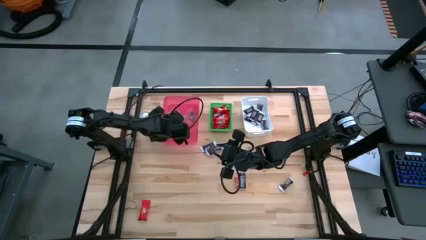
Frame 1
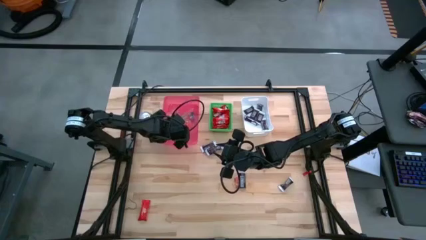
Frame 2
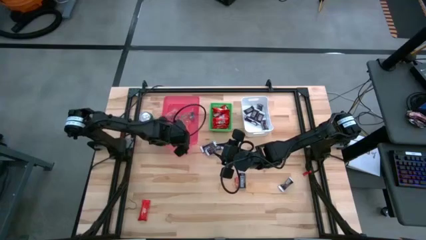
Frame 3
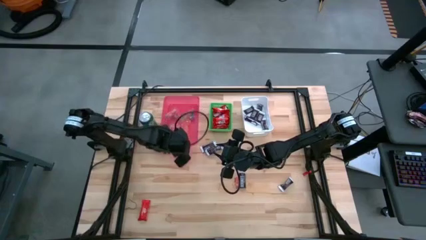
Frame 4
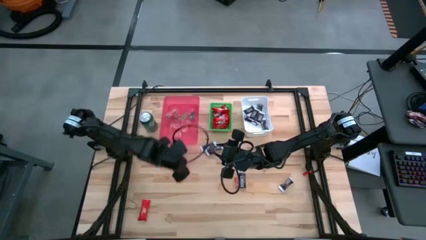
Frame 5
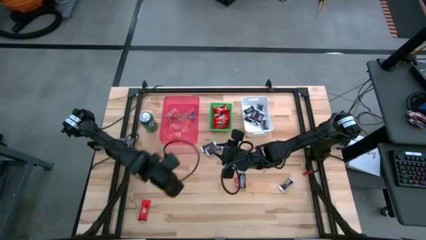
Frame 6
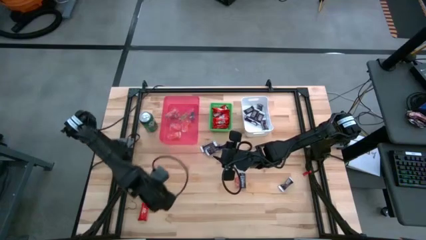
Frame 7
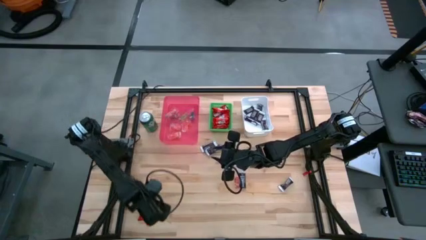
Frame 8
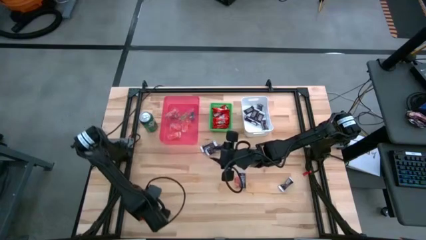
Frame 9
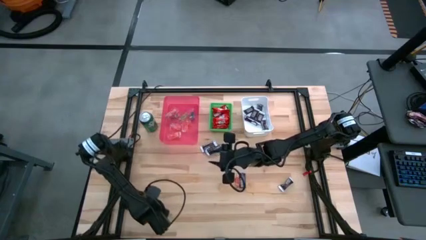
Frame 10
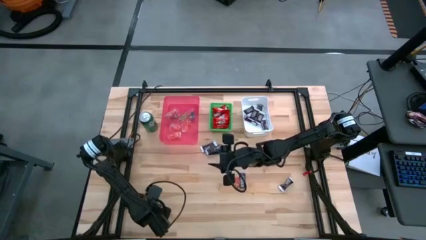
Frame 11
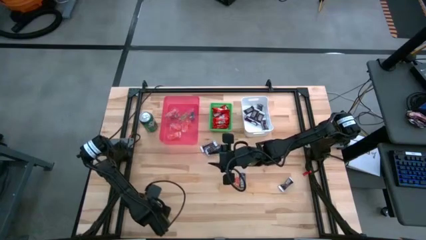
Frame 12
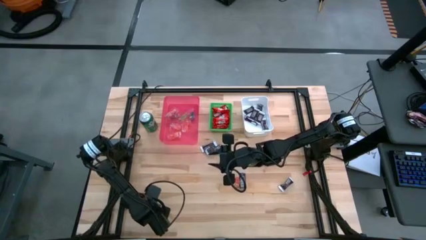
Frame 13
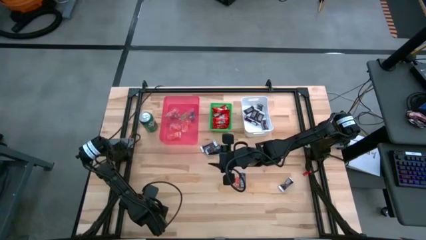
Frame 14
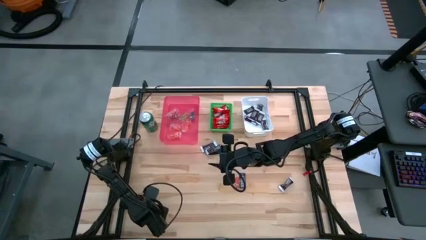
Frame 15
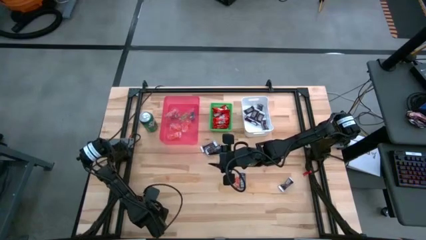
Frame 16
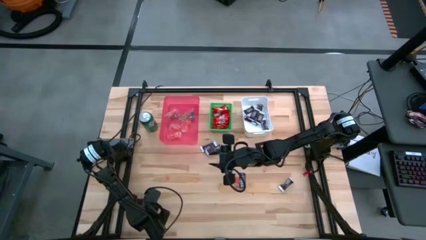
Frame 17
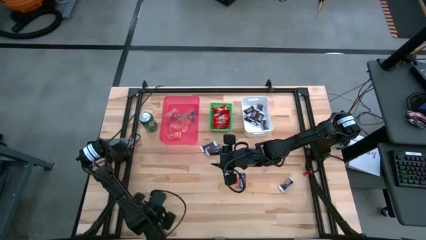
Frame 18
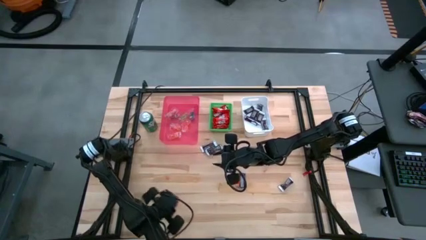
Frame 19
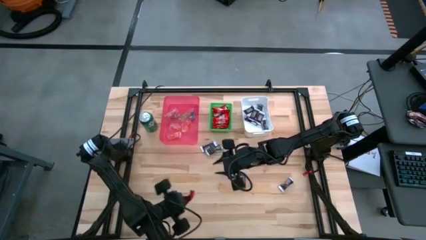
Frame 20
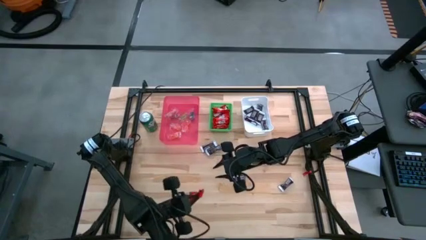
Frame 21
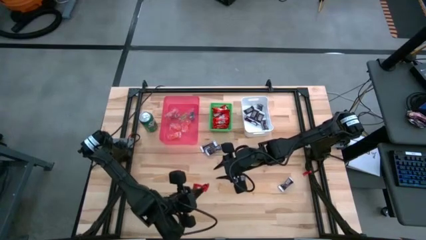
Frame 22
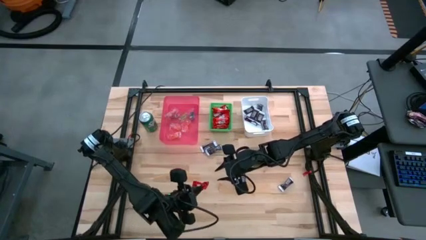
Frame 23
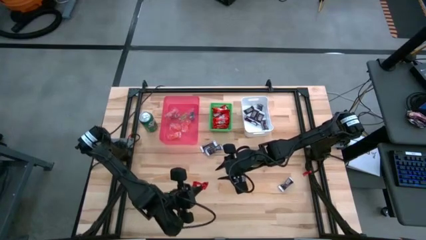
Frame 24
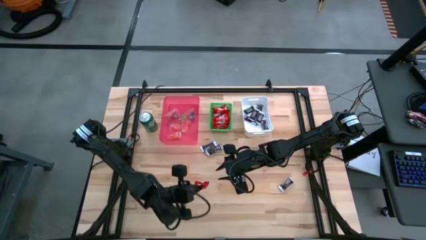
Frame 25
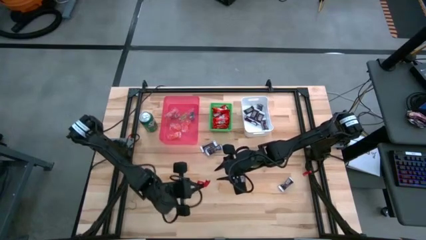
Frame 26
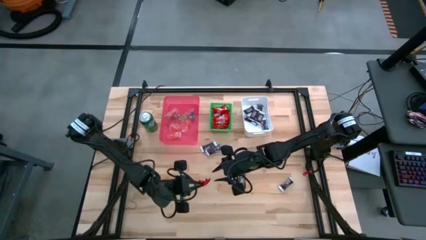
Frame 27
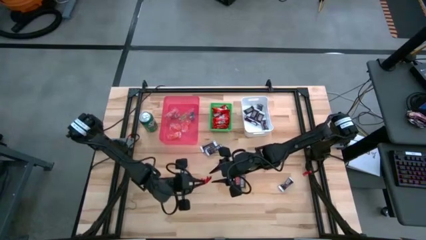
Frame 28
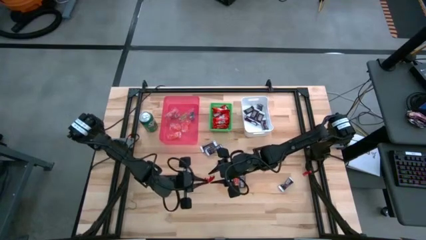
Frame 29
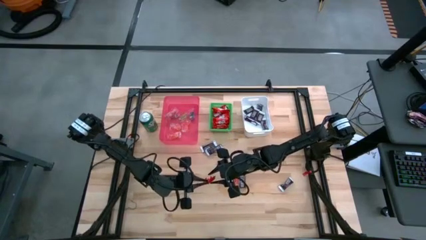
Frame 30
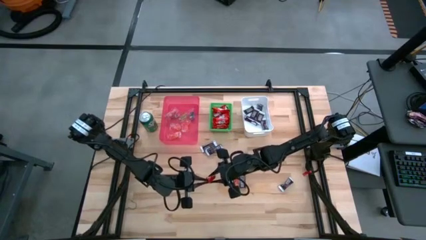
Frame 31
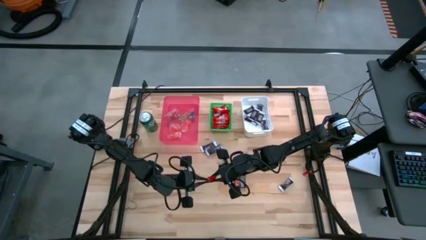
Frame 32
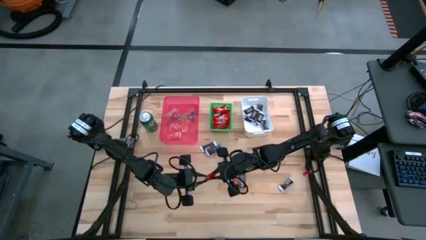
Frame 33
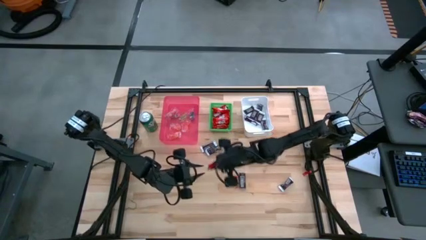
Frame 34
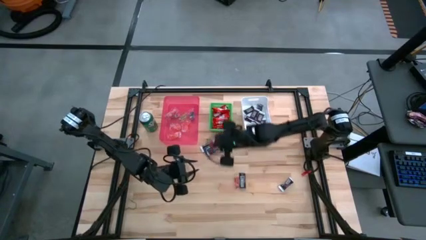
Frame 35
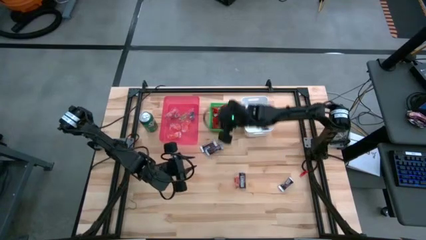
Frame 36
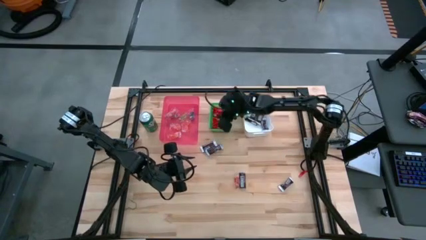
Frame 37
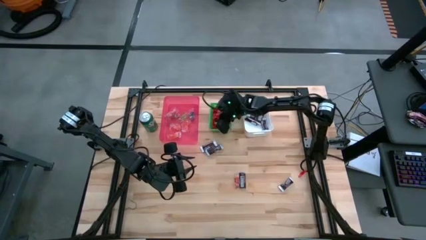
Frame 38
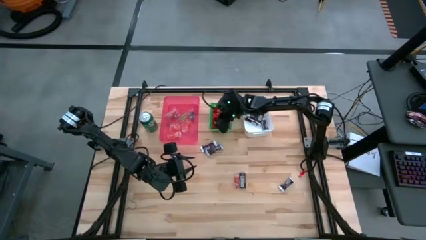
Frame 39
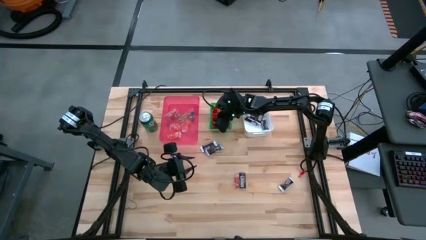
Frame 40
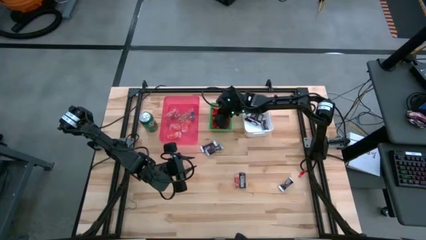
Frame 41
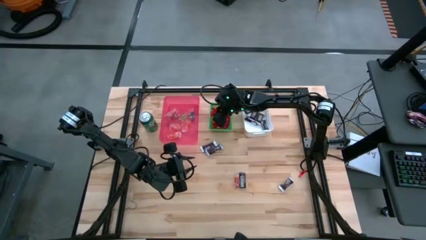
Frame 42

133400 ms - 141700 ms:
Task: Sort candy
Put the red chocolate into the green bin

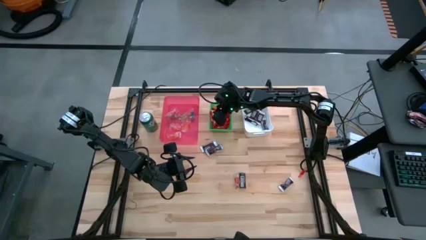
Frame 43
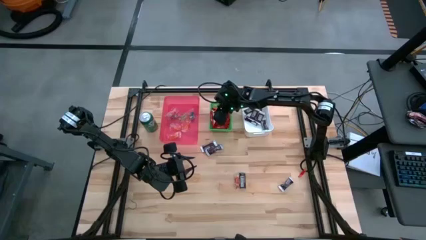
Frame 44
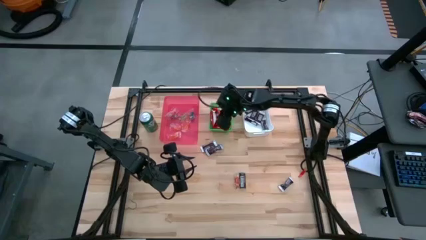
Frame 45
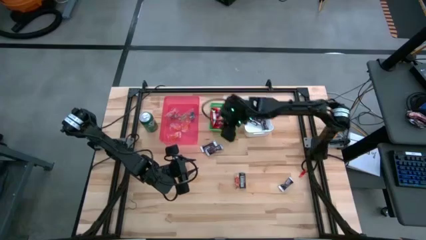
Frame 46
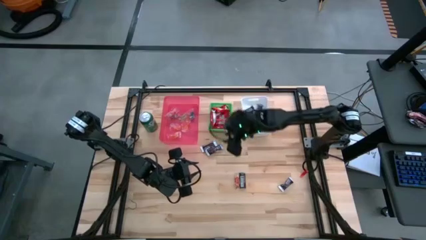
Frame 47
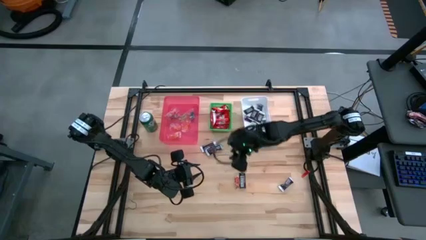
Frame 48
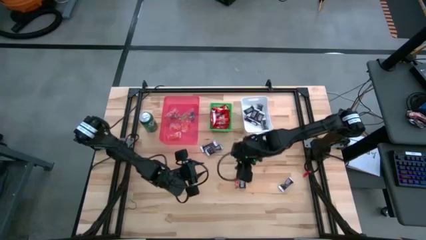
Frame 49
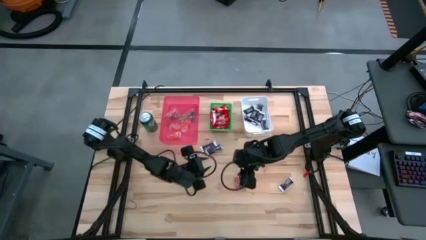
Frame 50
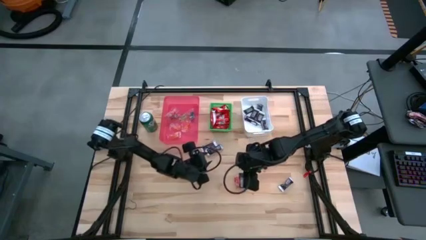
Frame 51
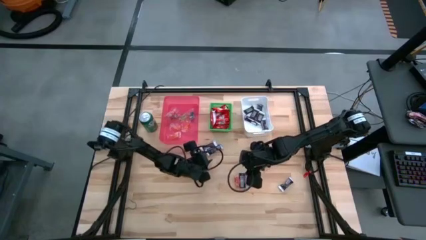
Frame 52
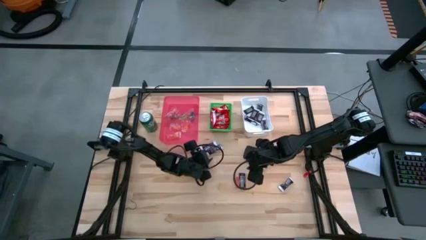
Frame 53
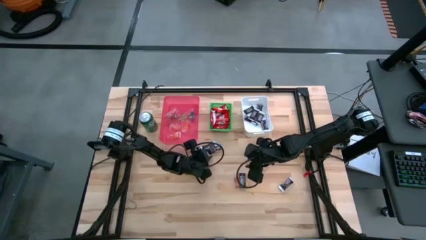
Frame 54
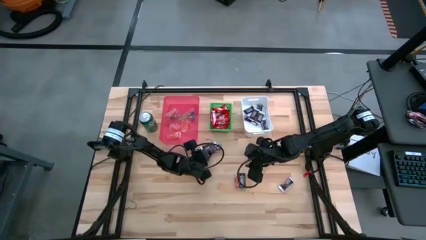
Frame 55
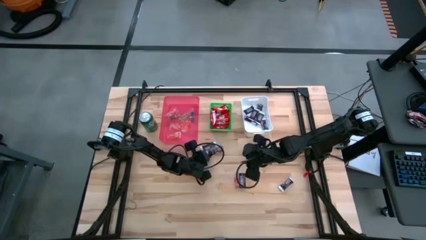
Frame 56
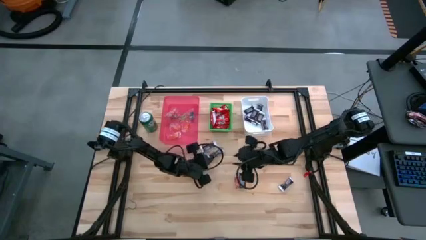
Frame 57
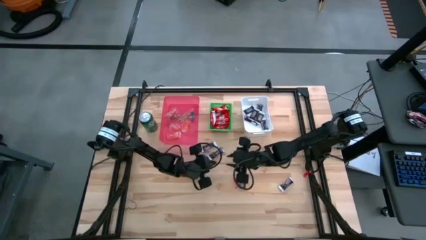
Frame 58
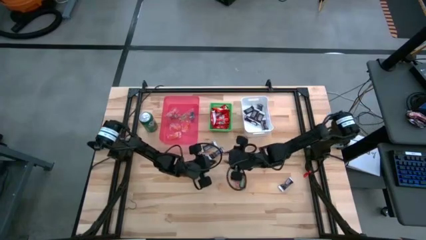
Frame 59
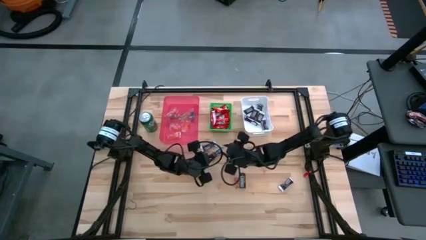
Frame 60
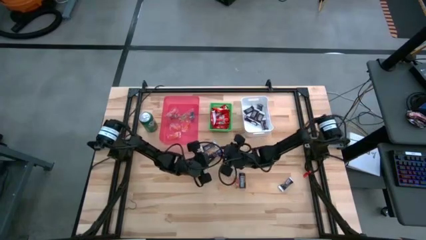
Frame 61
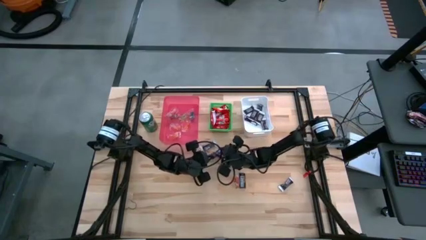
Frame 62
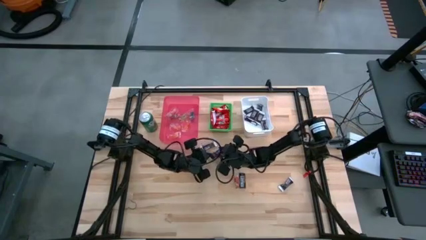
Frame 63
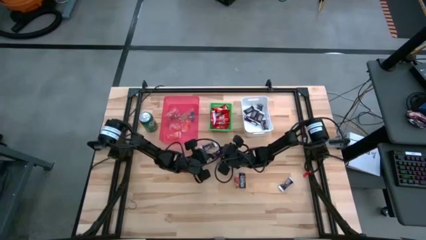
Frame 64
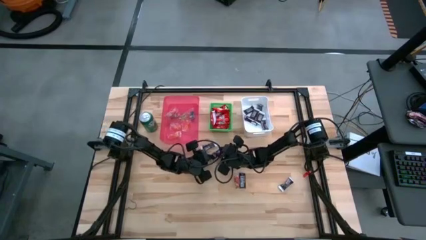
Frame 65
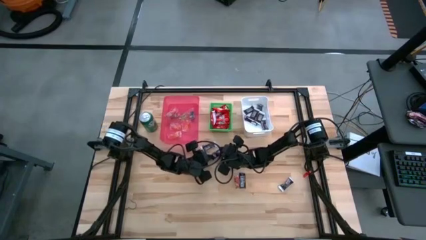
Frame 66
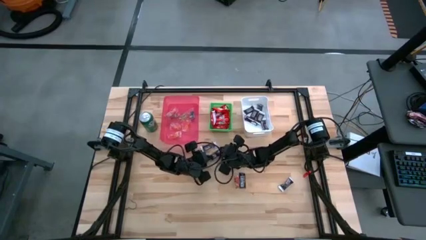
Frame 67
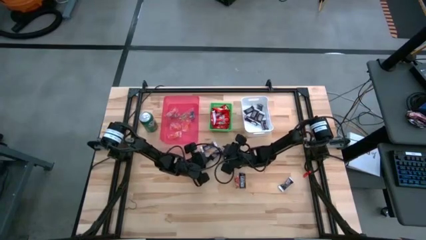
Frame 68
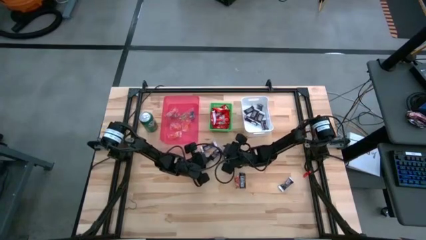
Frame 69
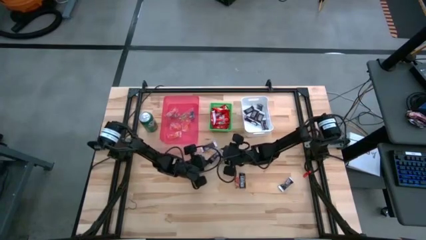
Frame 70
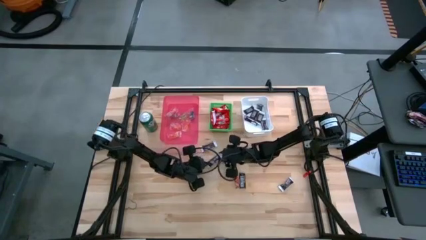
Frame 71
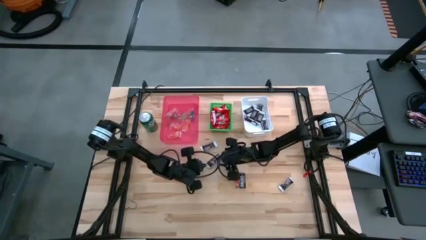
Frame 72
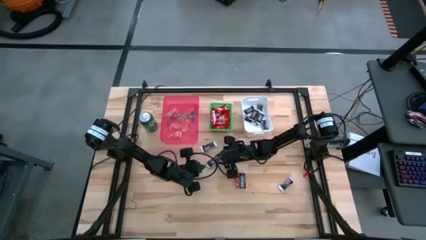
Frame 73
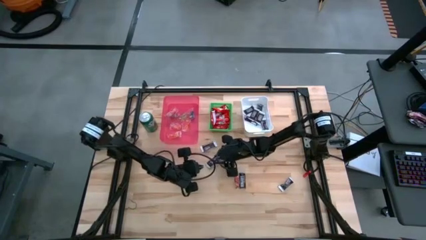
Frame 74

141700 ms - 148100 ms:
Put the brown chocolate into the white bin

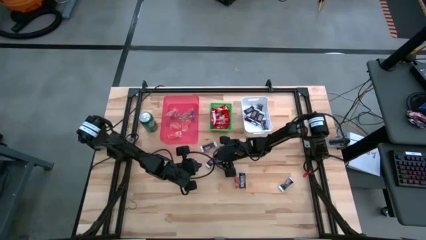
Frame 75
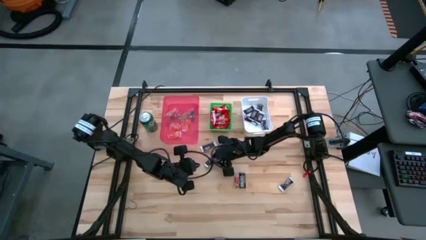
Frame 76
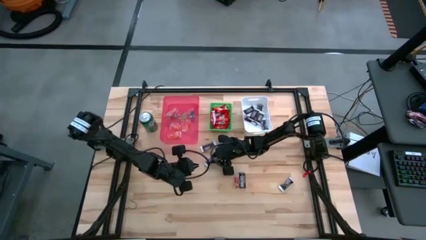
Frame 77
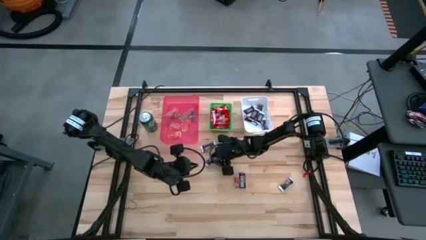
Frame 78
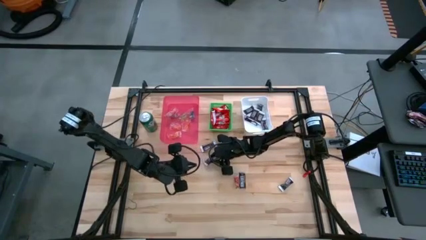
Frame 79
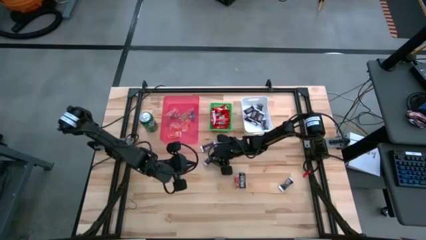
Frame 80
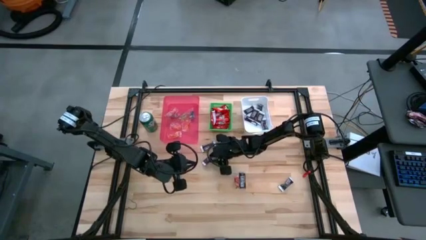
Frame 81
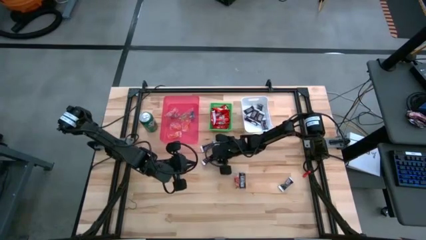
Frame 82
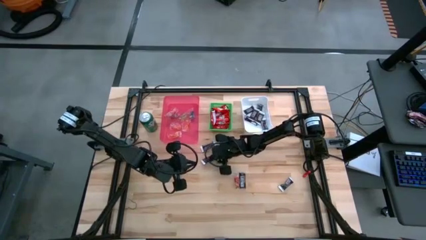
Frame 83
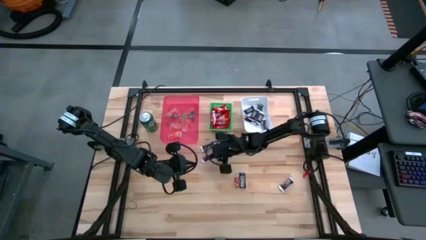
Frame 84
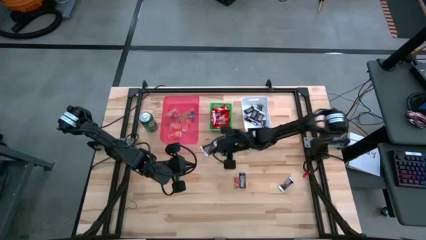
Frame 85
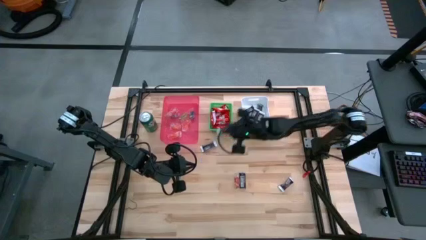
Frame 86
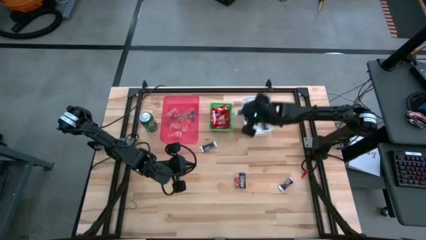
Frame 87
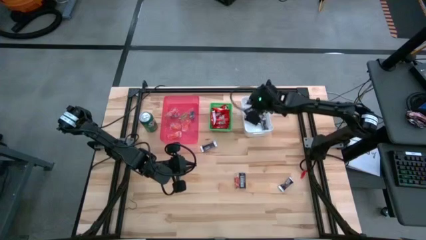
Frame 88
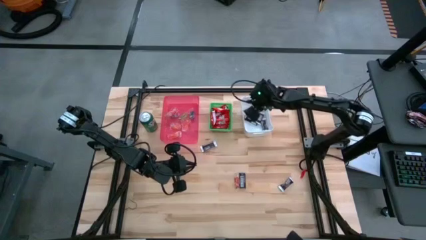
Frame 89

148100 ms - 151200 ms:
Put the brown chocolate into the white bin
